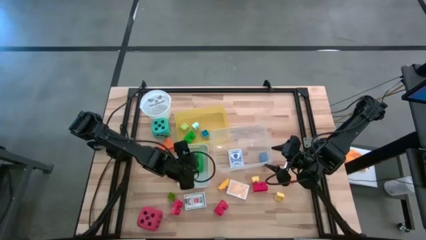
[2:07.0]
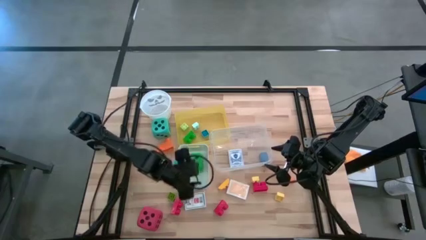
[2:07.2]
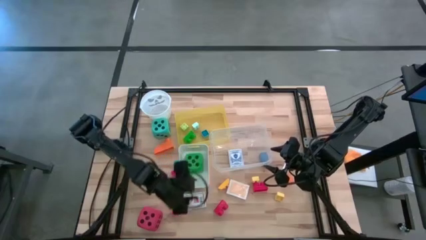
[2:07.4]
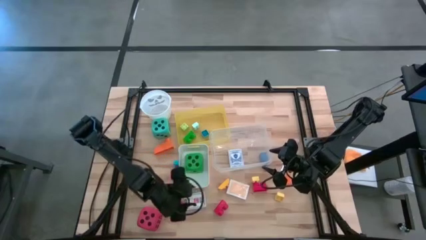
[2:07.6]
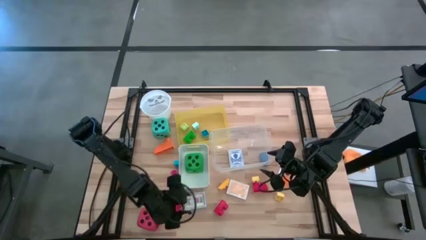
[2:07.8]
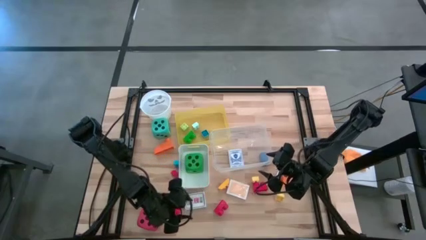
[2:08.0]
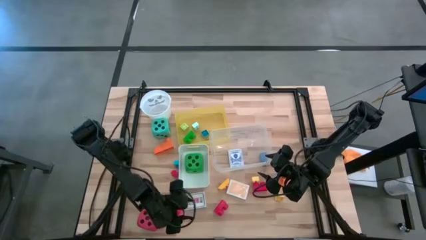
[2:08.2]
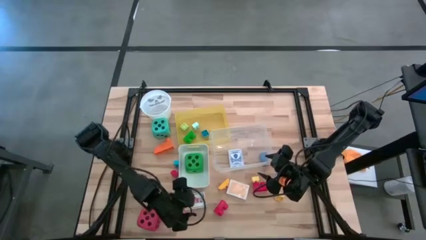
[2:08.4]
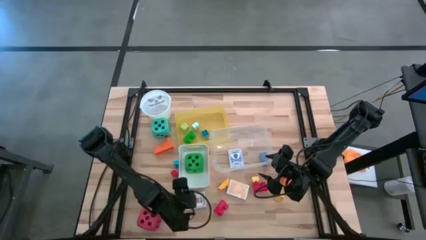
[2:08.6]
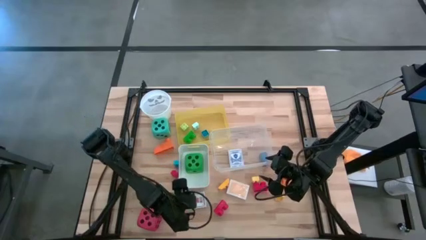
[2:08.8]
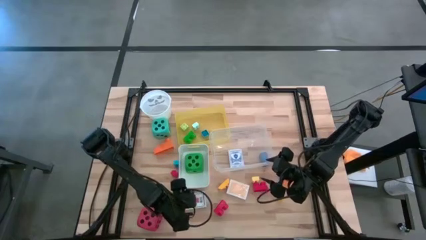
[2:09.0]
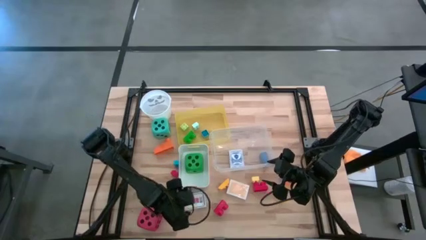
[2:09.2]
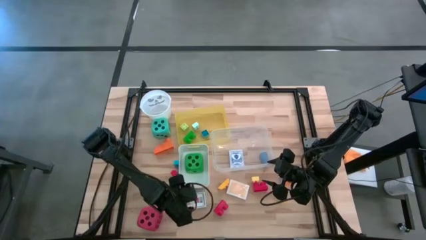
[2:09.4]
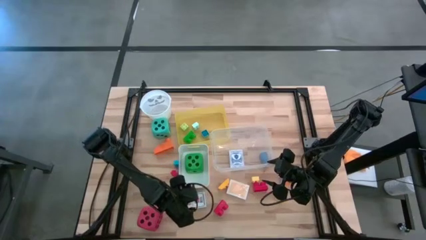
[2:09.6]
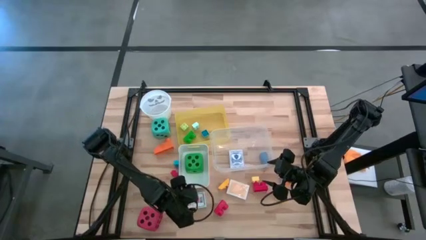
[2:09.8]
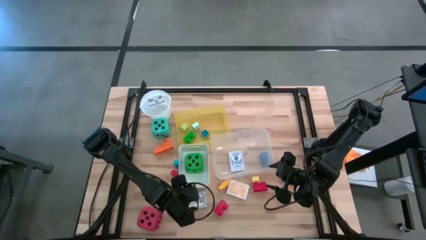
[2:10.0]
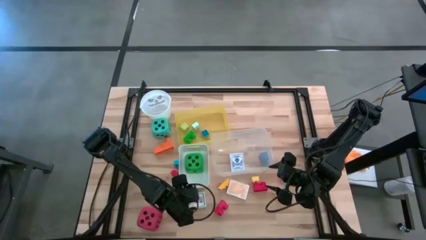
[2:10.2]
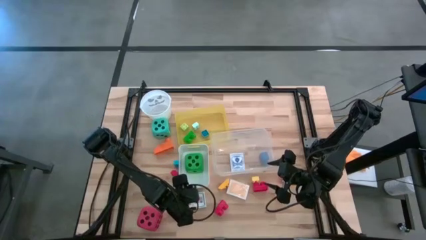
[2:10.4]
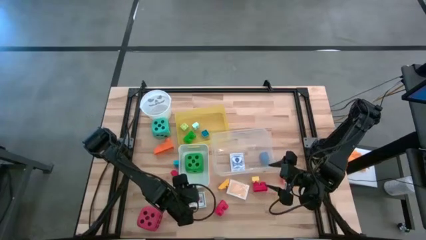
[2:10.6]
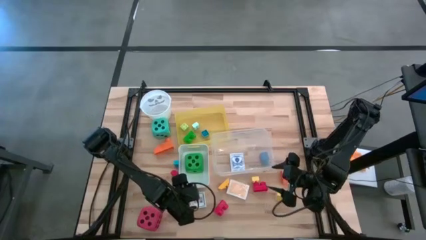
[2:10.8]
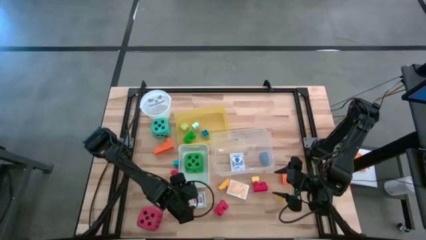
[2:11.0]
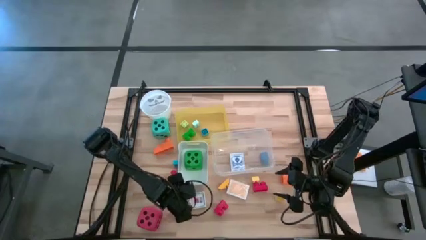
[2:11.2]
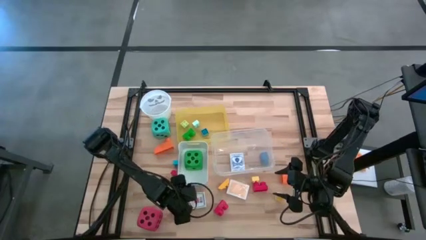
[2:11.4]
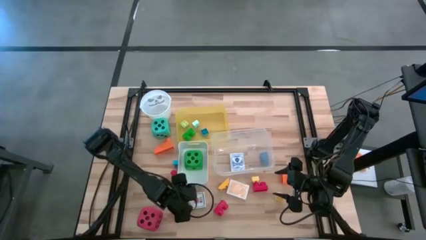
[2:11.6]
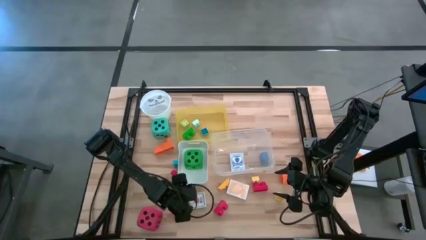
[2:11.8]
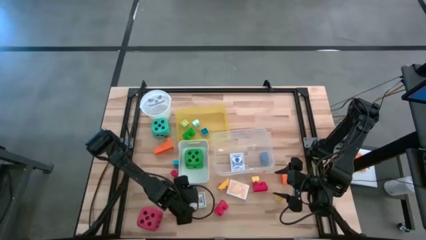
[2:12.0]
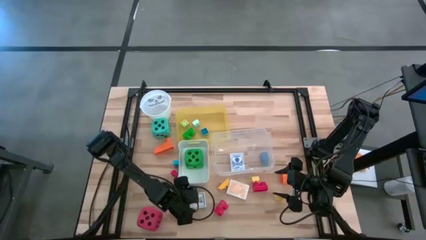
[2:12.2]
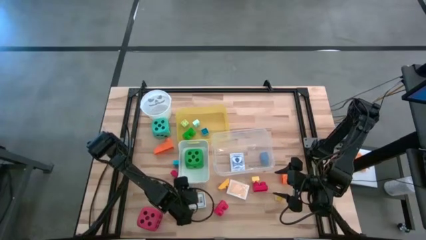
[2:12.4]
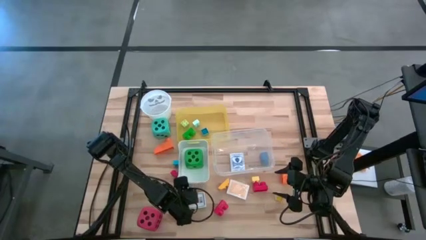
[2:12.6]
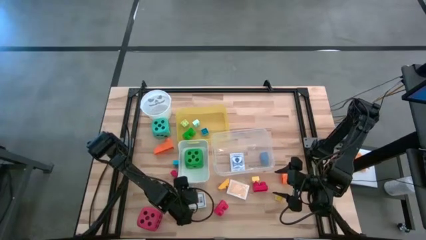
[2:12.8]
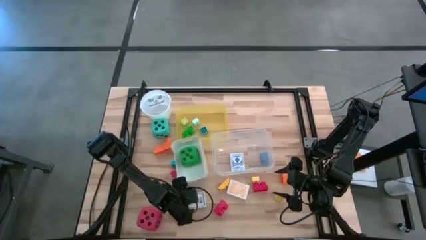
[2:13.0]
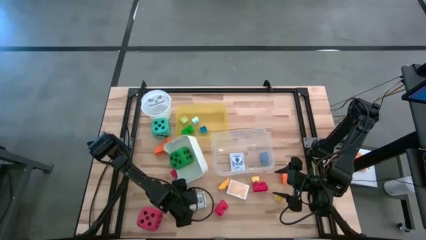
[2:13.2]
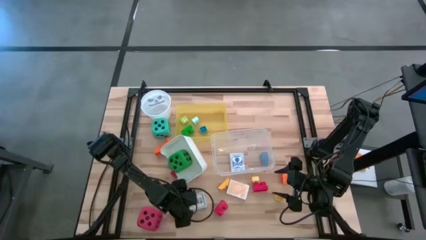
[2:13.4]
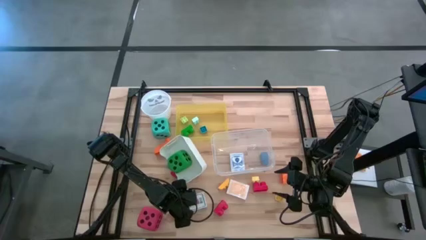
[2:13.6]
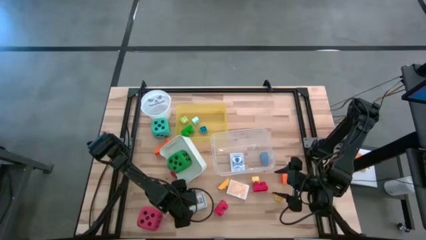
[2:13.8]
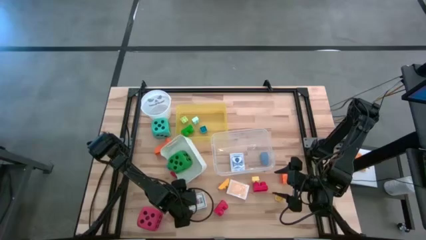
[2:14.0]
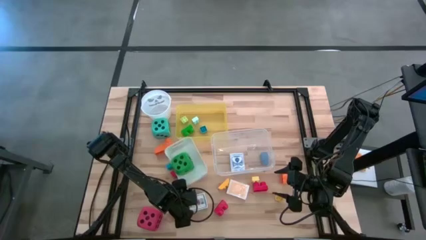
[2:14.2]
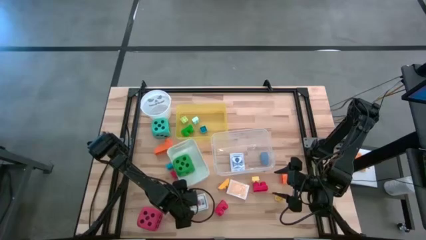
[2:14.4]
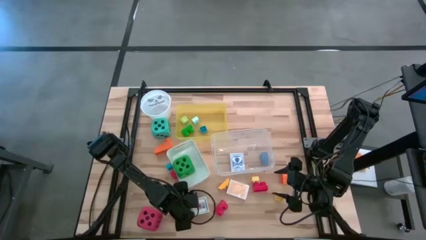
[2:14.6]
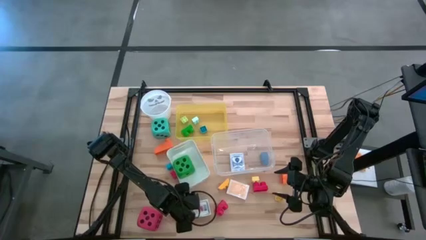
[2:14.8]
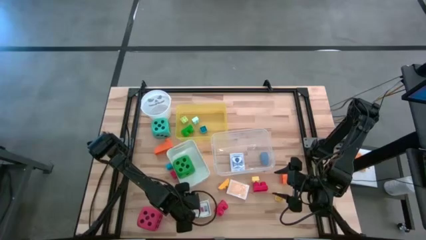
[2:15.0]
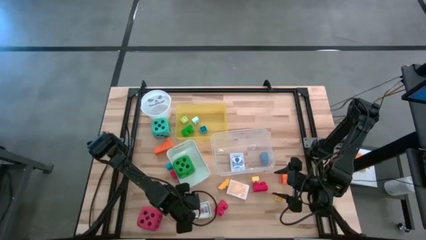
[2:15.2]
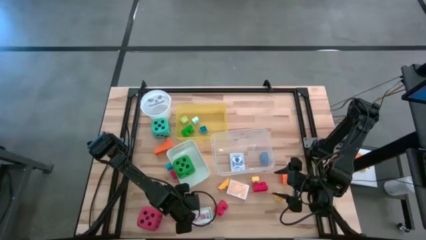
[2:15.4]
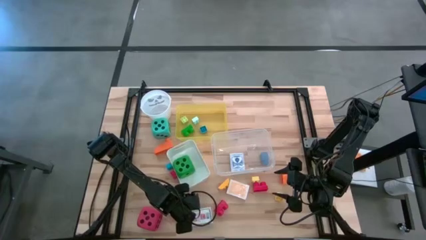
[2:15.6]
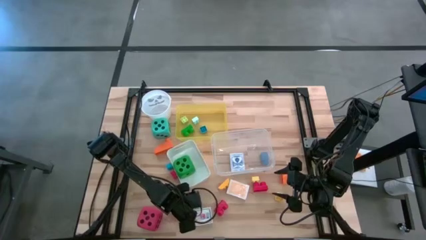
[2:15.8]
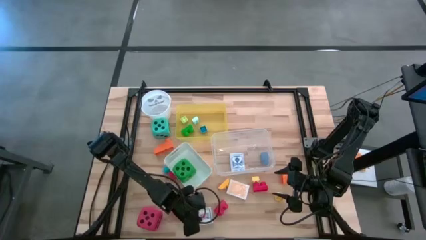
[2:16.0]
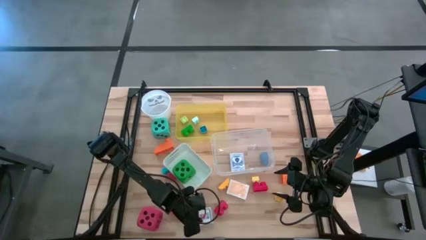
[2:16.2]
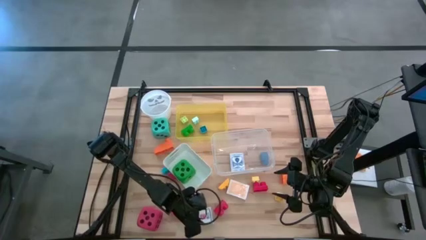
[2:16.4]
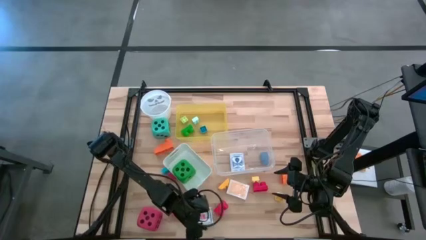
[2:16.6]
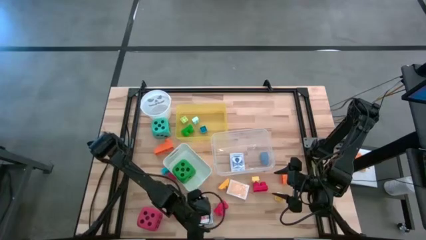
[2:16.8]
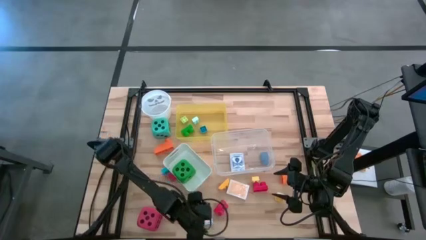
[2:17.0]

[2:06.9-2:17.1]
Task: Pick & Place Toys
Put the white game card pack into the transparent bin

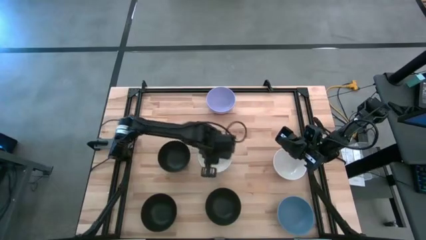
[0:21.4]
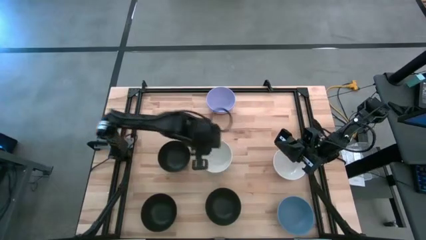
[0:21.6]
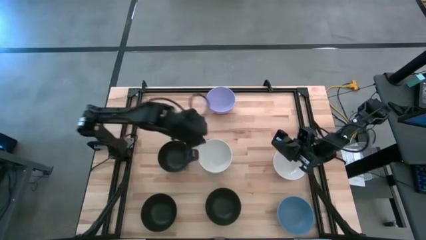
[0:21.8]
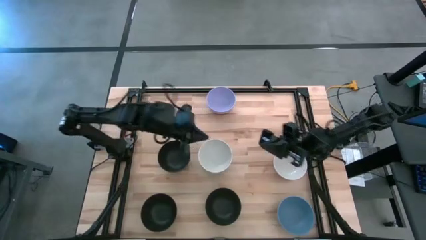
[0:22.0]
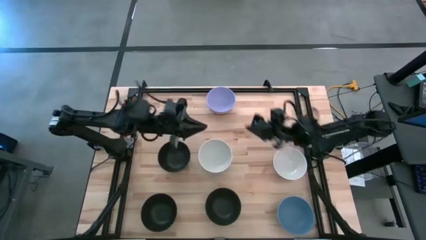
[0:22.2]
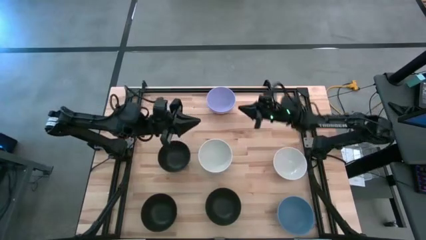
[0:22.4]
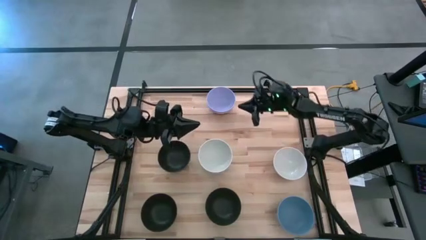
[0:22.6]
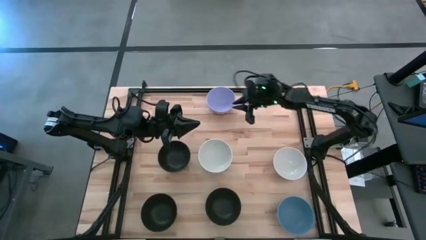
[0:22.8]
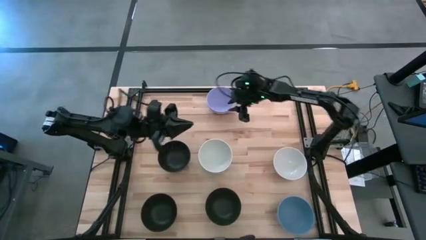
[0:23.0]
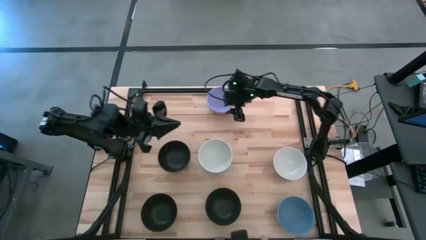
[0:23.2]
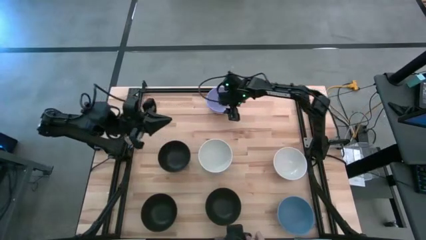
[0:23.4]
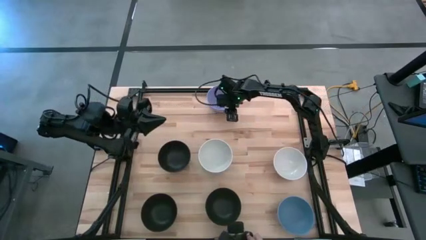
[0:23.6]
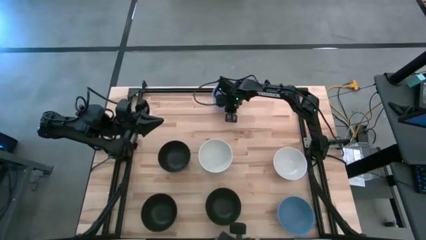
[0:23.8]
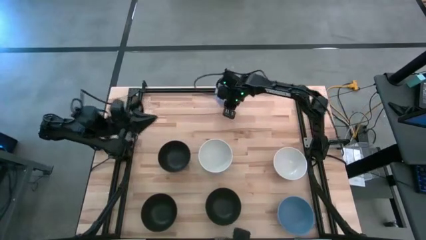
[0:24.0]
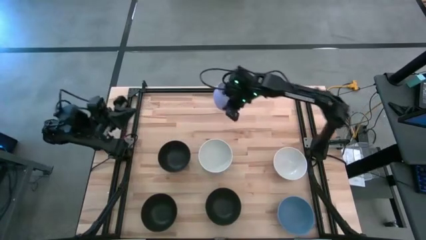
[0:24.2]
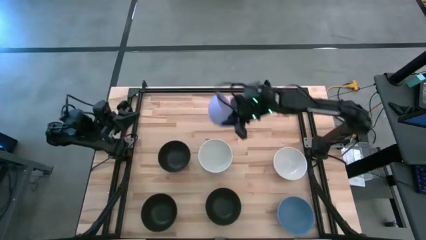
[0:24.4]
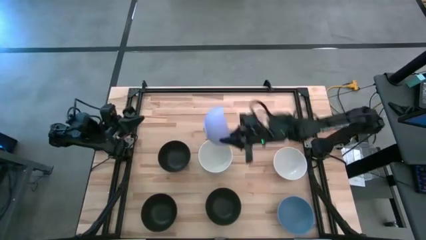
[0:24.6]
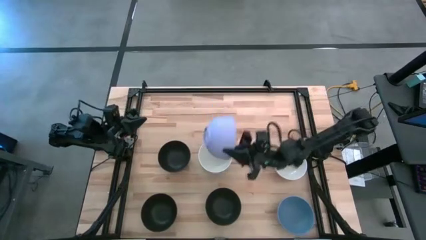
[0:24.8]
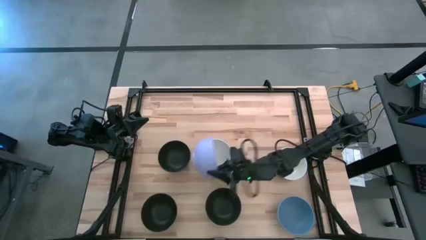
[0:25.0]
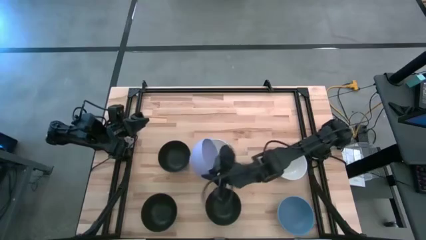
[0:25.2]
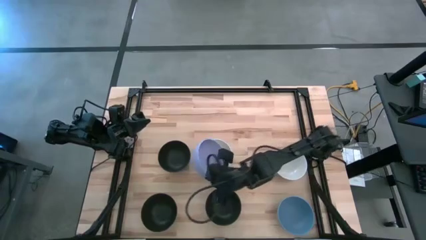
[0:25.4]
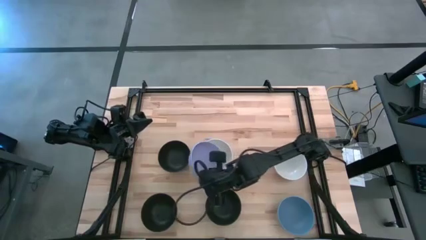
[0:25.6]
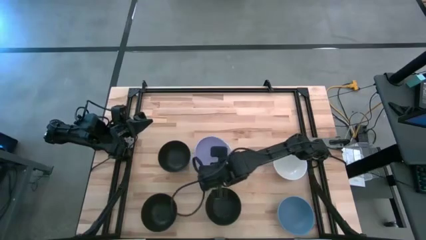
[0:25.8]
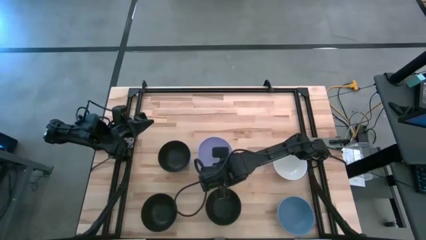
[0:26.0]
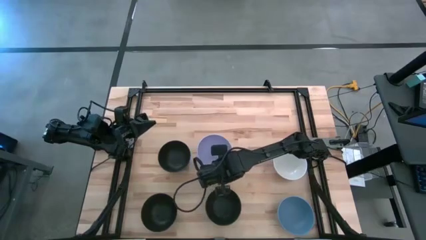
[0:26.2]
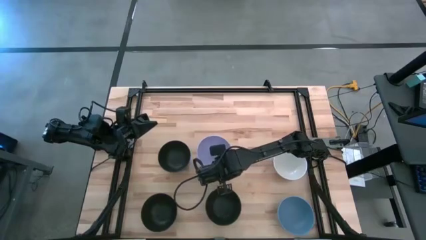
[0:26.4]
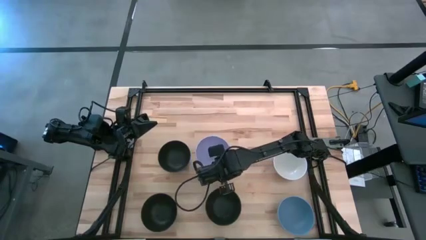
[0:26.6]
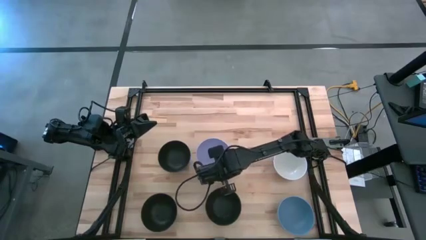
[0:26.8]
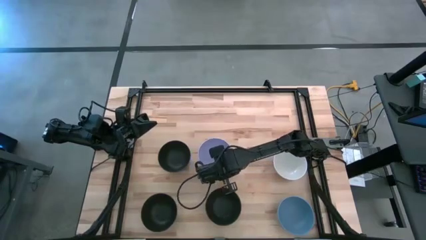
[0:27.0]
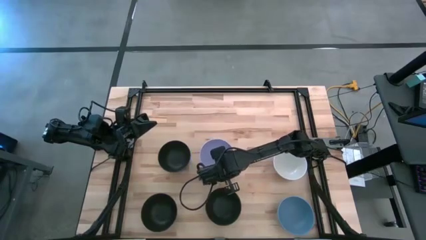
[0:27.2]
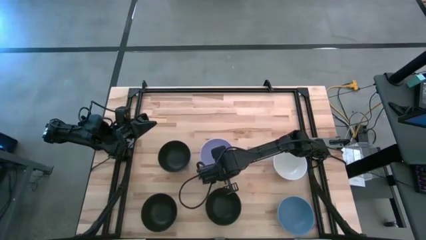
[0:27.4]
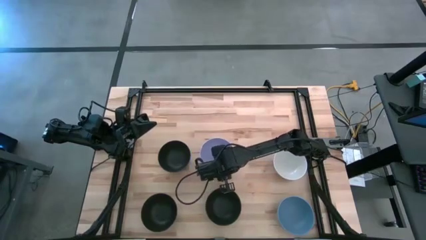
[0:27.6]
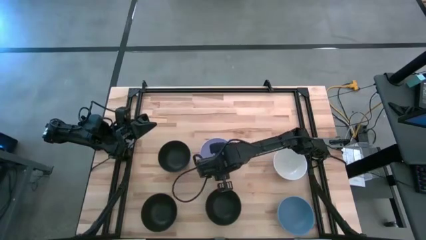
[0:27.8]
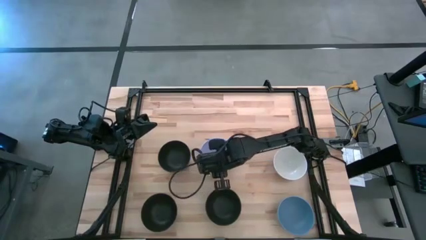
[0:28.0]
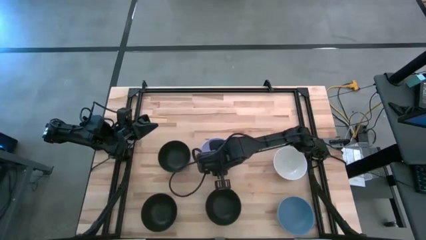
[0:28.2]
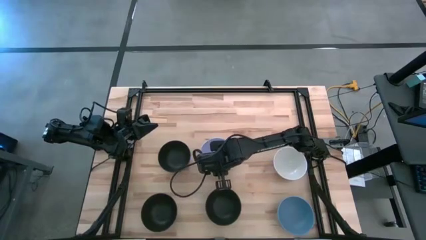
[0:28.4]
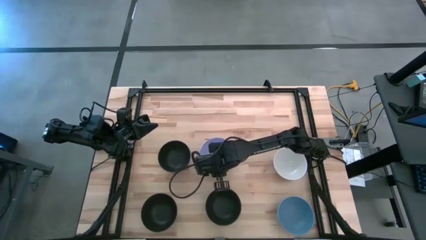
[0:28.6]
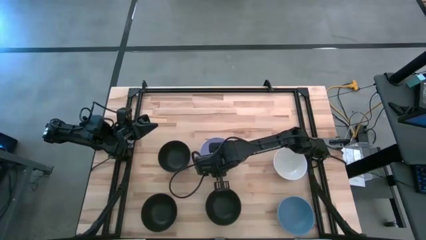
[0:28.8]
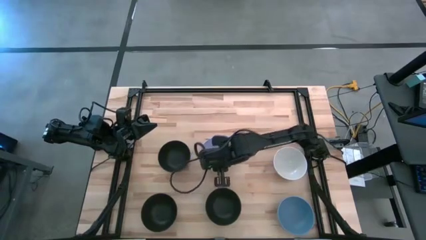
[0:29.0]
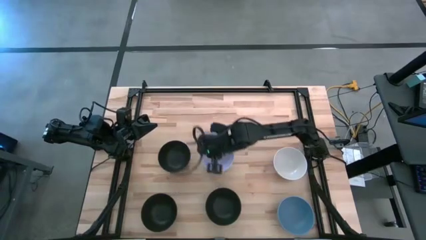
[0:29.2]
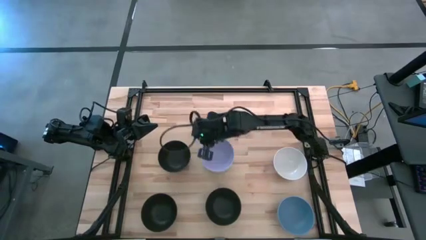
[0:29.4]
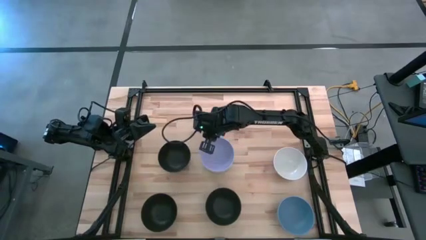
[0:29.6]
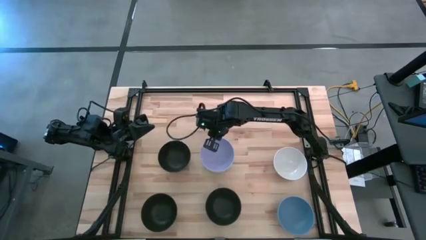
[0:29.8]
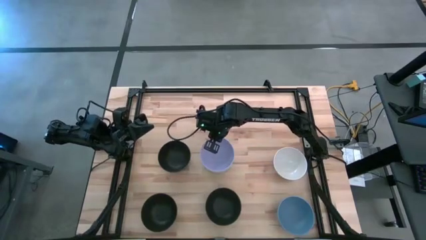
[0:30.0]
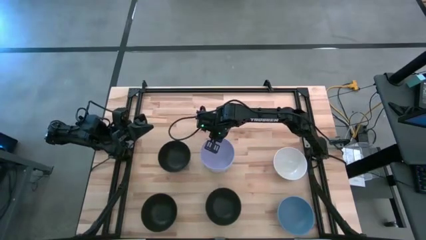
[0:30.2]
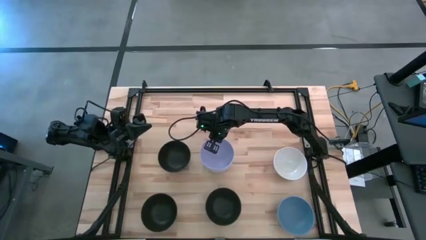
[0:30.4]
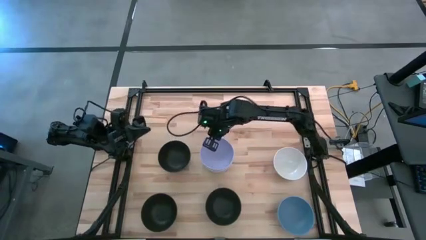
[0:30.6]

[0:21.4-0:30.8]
Task: Nest bowls inside each other
Stack the purple bowl on top of the white bowl
